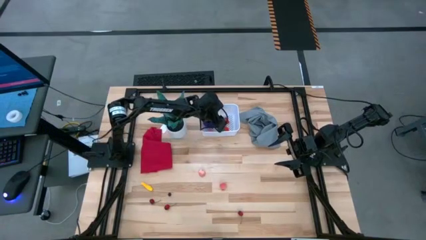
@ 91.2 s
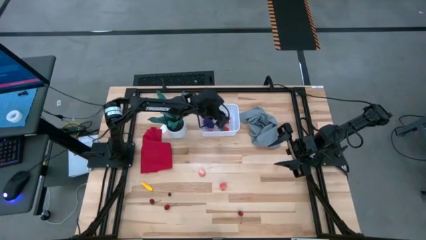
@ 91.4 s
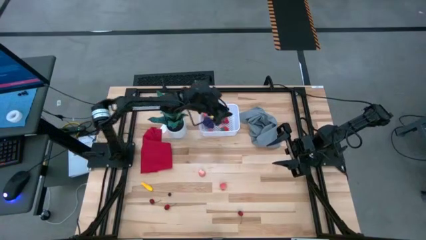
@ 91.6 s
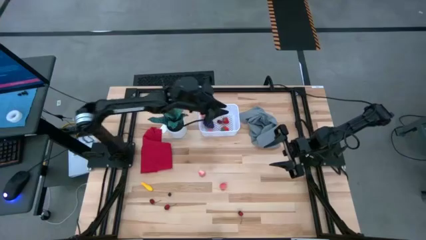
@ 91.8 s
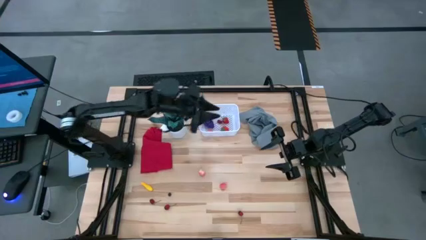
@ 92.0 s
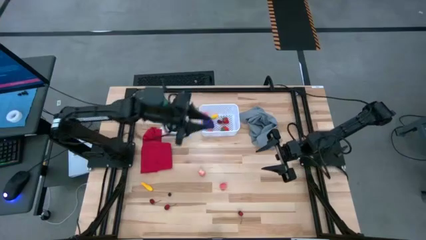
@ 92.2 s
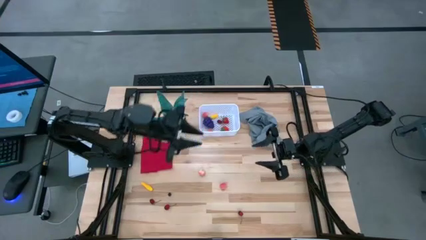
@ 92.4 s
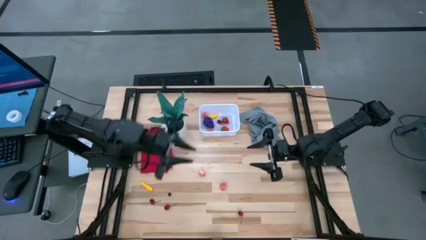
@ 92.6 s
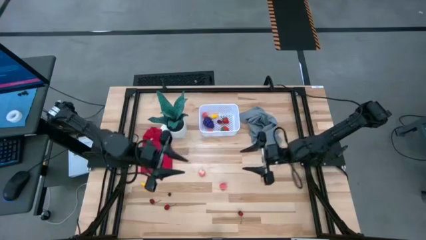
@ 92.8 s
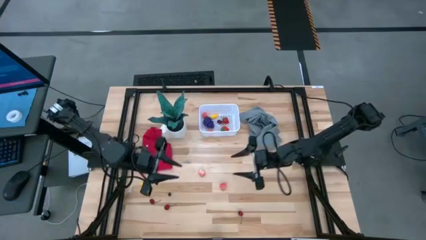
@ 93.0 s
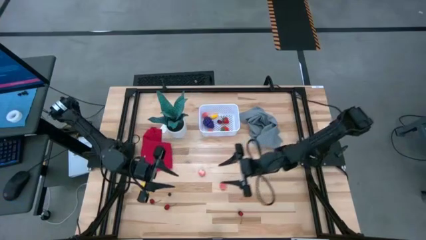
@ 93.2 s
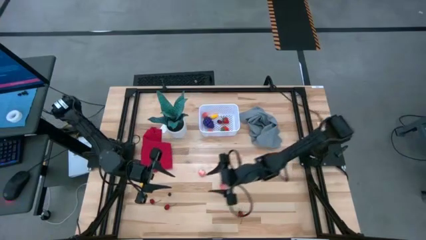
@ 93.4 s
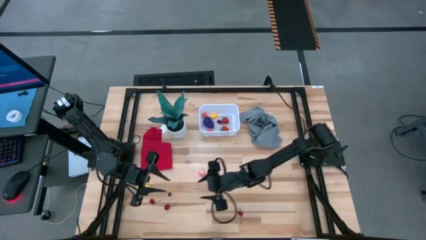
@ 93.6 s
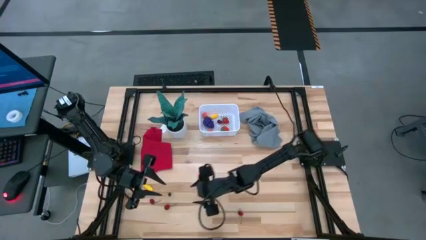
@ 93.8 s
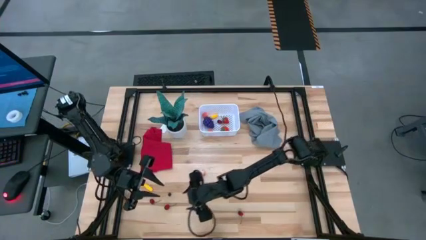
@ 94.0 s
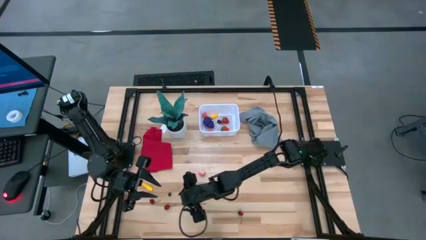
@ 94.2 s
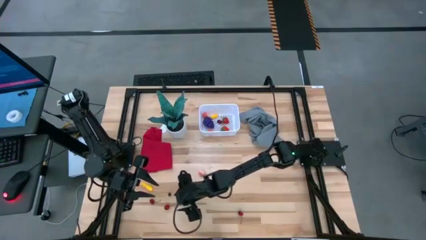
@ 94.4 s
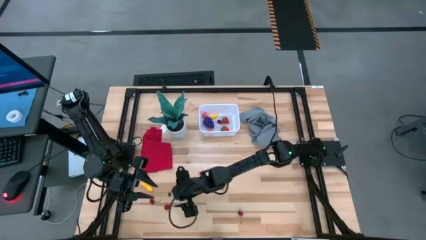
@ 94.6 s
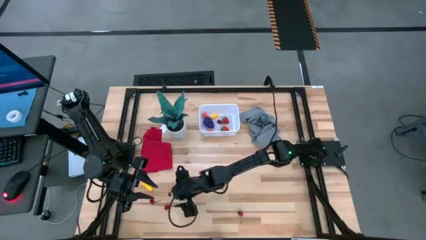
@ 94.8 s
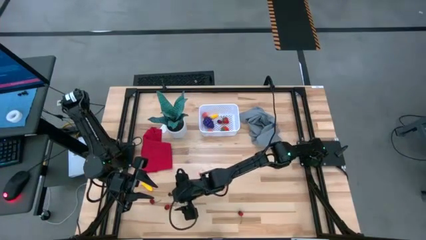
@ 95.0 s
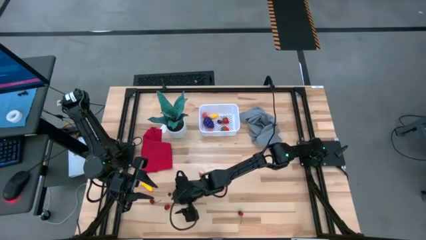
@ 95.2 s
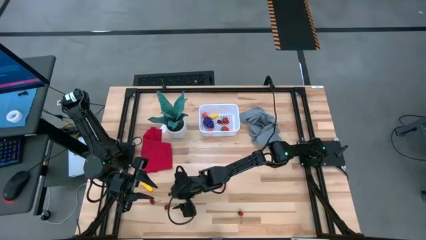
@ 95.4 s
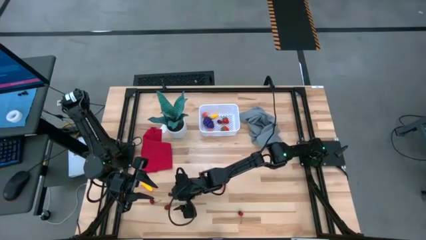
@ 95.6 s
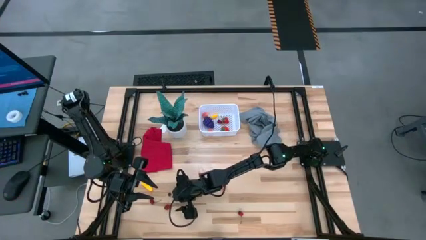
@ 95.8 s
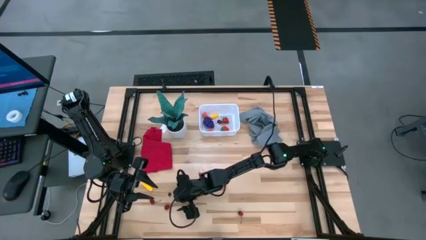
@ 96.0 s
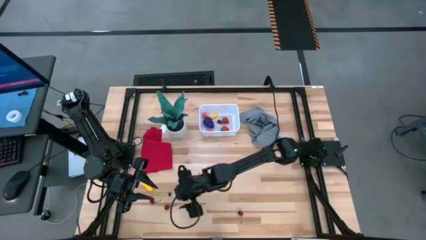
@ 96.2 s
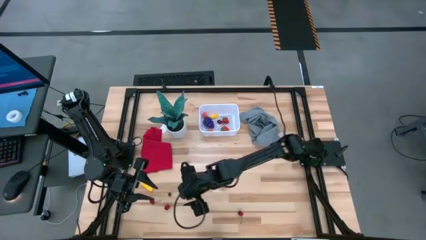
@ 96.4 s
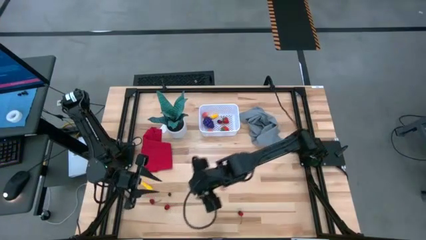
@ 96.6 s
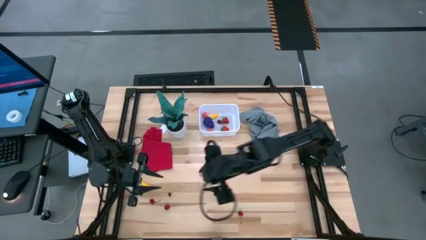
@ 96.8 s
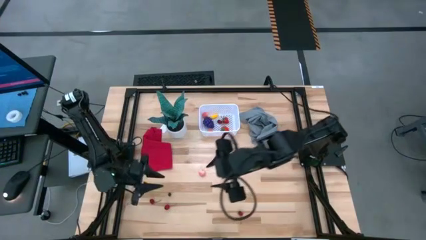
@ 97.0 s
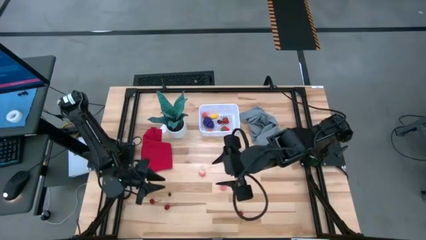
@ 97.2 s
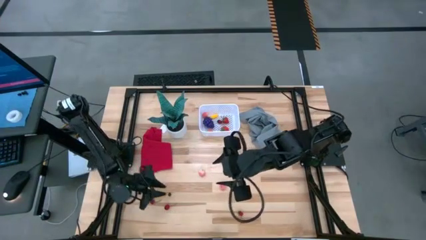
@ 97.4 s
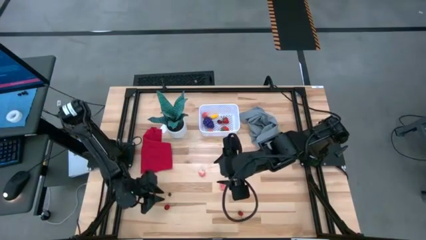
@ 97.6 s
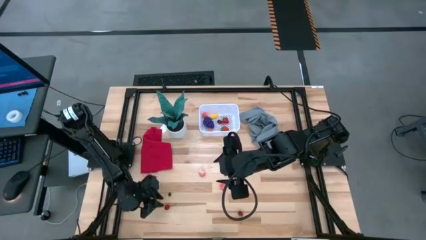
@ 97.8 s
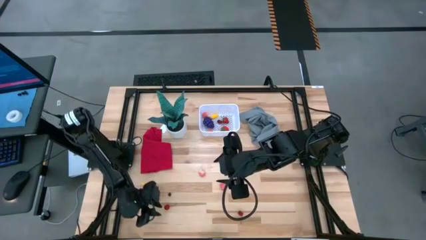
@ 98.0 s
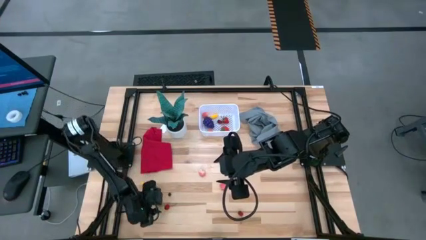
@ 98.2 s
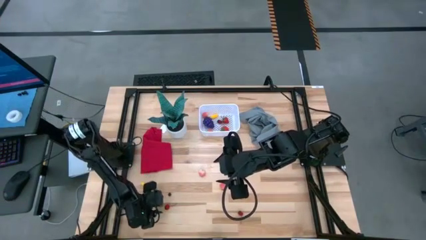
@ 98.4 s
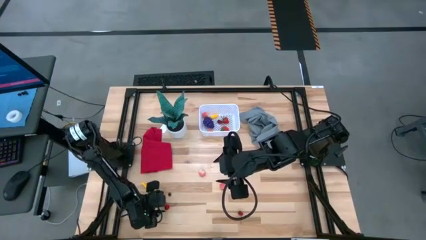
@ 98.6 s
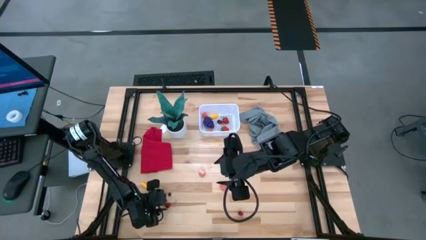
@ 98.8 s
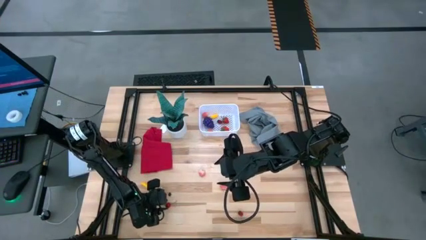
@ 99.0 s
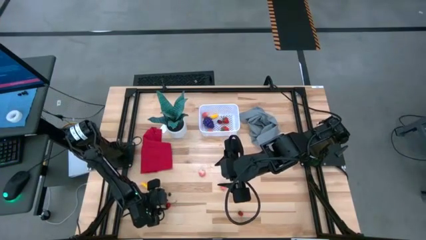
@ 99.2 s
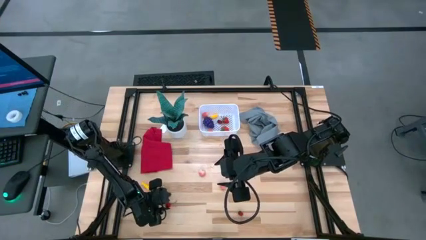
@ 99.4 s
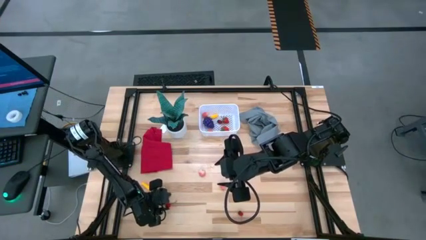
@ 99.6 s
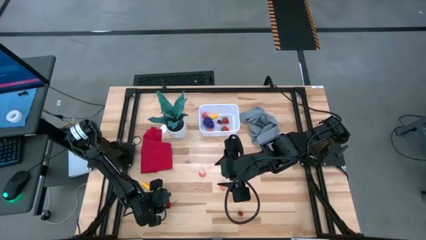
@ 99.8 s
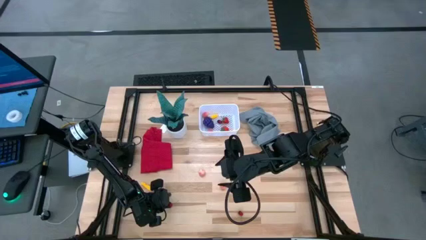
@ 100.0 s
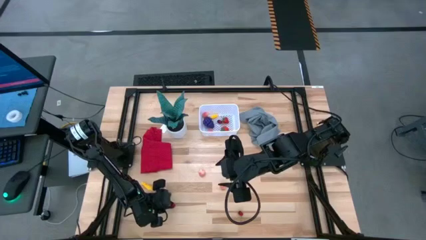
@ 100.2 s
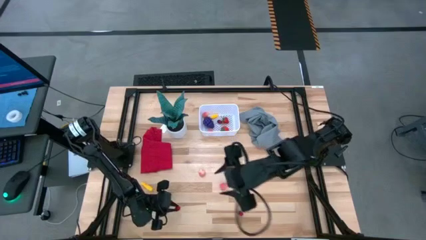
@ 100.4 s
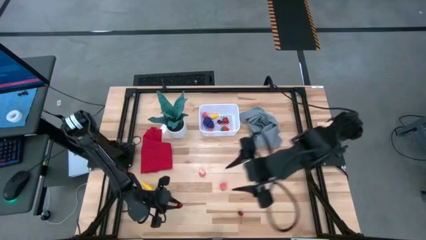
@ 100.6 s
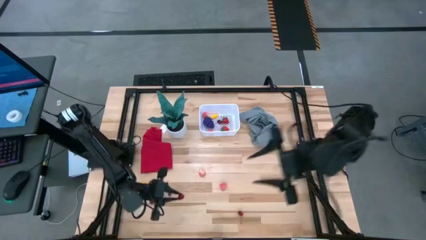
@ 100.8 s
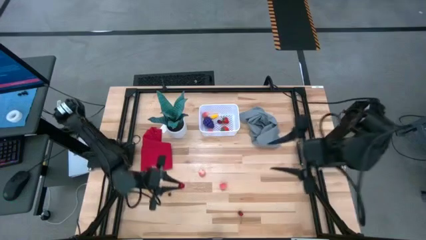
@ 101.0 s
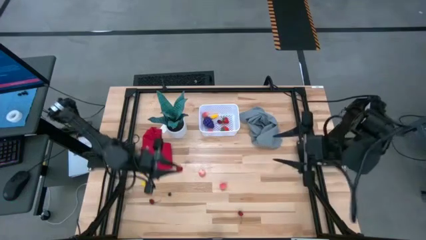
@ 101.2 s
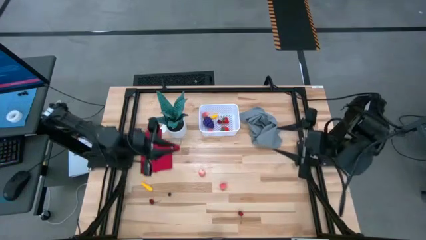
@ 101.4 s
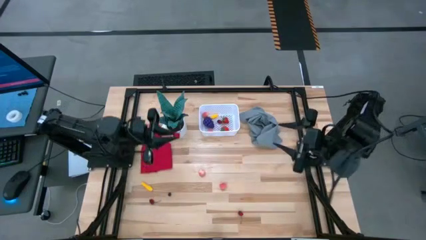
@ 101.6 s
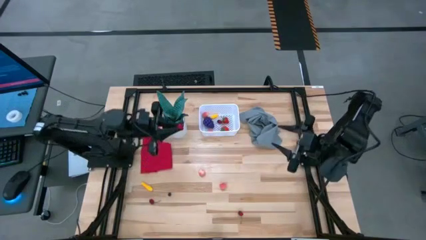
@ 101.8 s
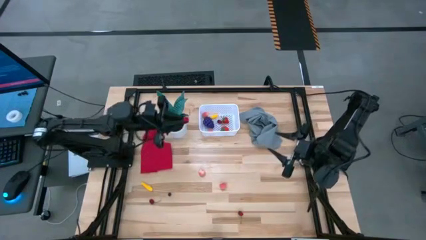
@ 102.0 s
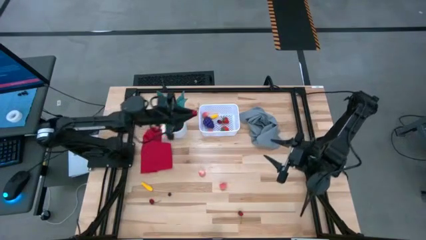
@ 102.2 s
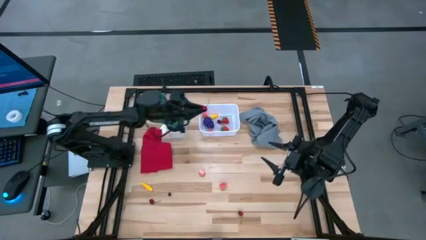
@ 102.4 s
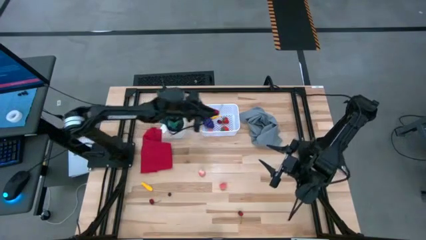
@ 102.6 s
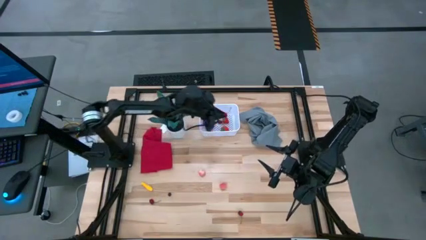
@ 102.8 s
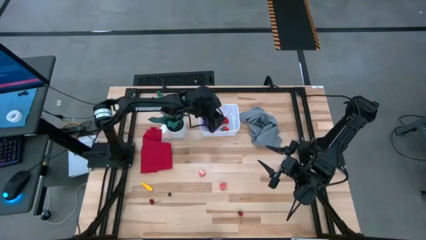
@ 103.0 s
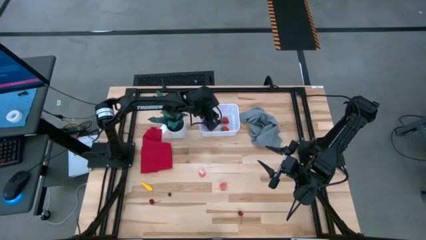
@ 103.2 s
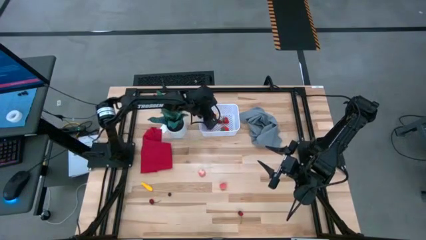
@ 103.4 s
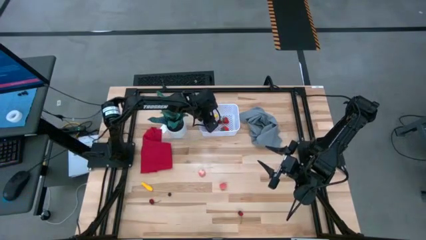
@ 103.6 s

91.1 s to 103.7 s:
Task: Pick and placing Produce into tupperware
Put the red cherry into the white bin

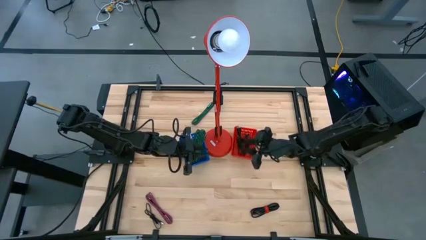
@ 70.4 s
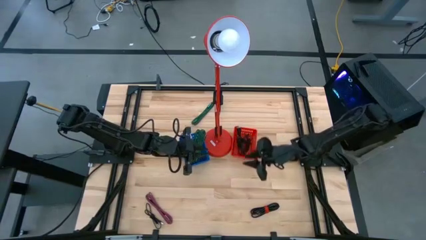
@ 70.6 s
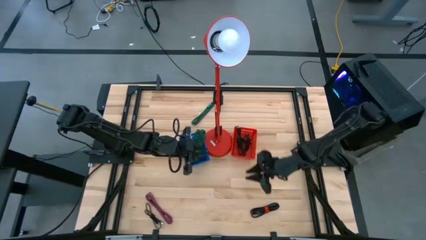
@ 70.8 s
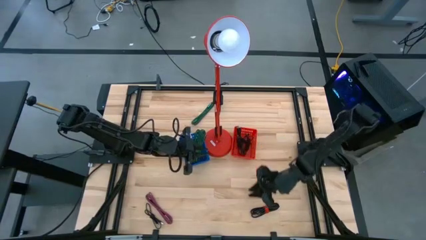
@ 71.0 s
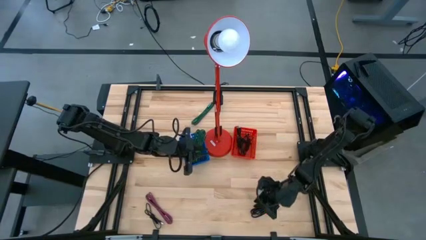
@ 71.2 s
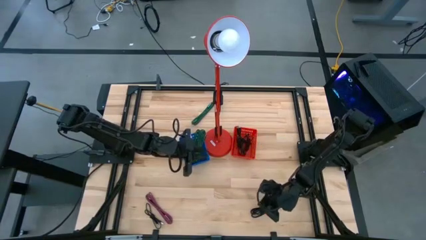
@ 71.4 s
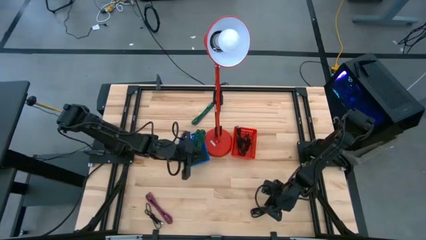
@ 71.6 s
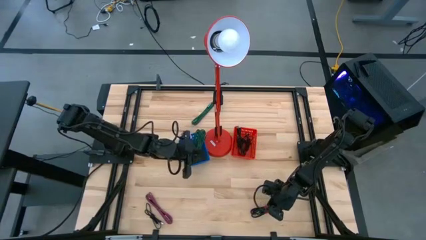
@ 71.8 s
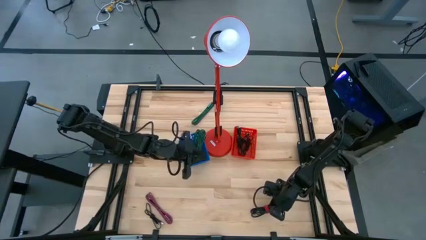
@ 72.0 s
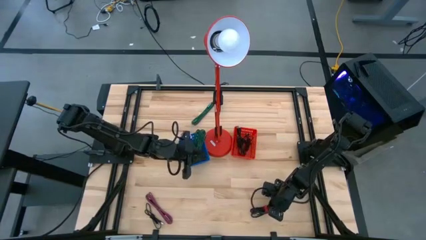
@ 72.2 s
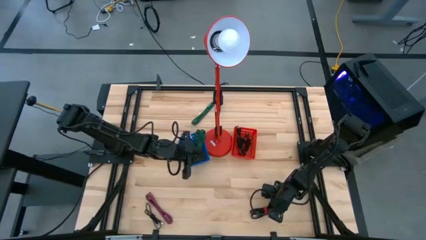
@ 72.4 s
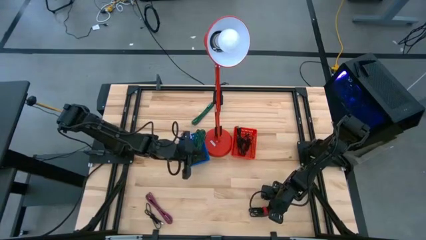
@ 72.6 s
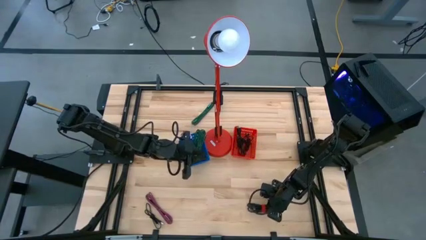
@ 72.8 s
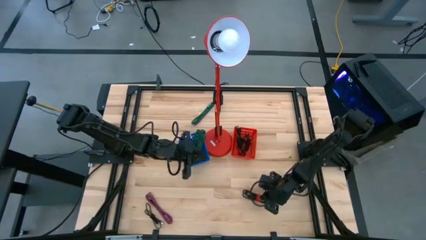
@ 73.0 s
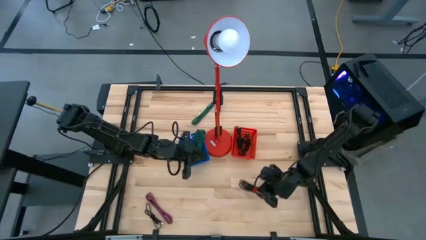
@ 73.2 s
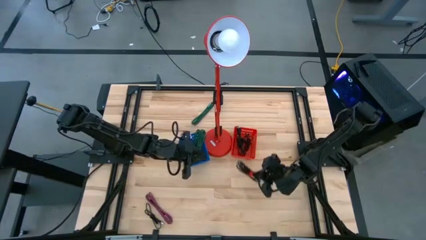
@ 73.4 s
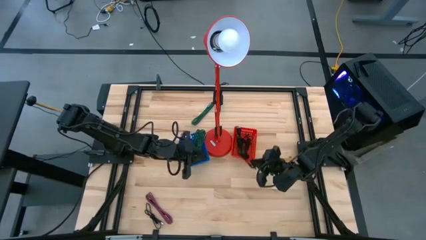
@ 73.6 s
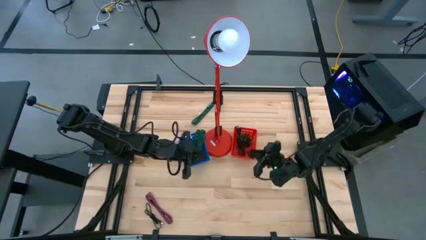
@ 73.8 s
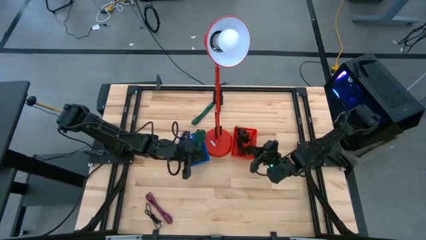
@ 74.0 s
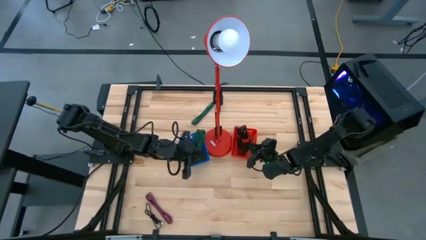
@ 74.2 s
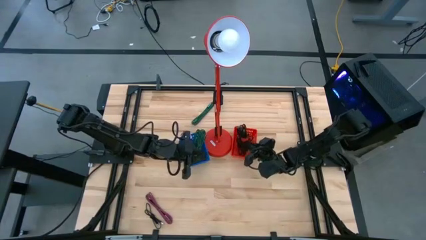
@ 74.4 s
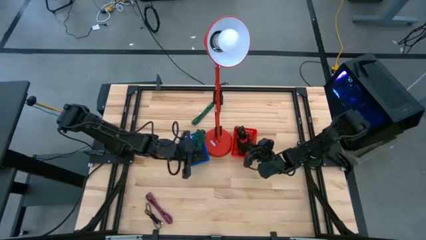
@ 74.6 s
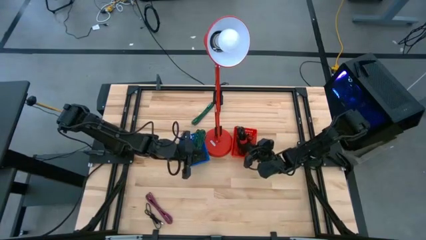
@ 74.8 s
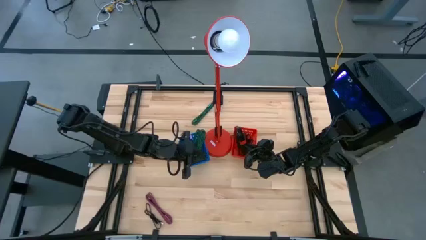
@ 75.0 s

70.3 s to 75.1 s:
Task: Pick & Place USB Port
Put the black charger cable into the orange bin
